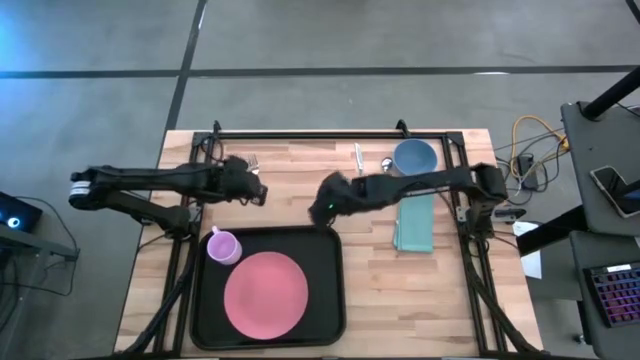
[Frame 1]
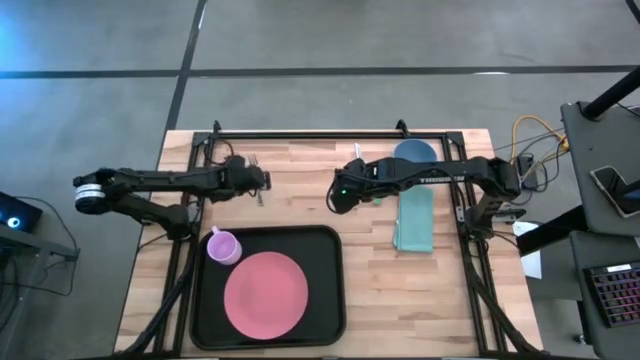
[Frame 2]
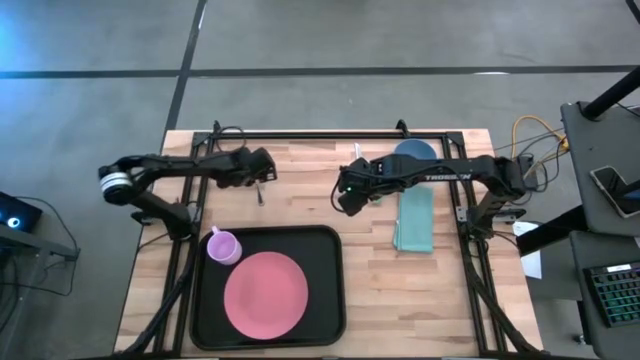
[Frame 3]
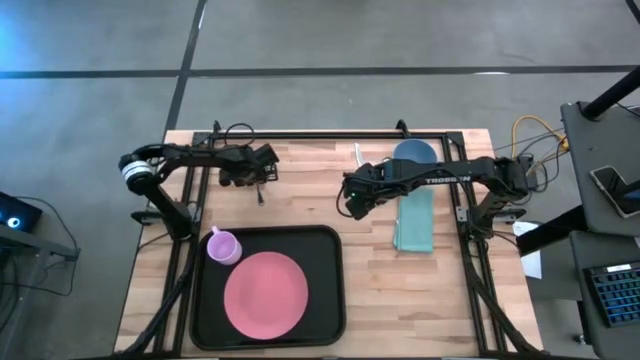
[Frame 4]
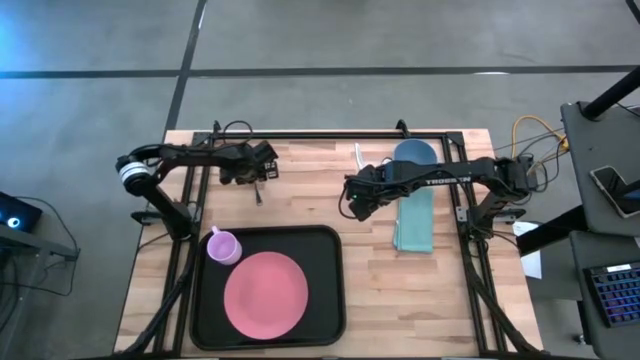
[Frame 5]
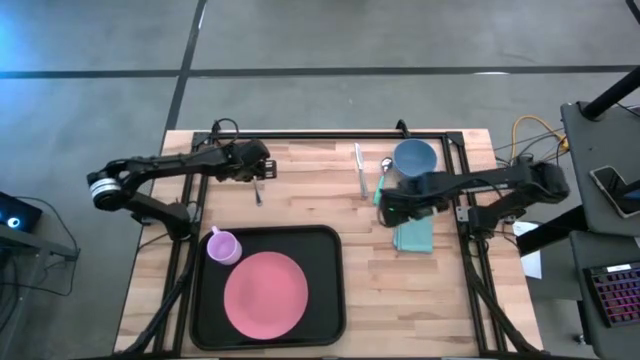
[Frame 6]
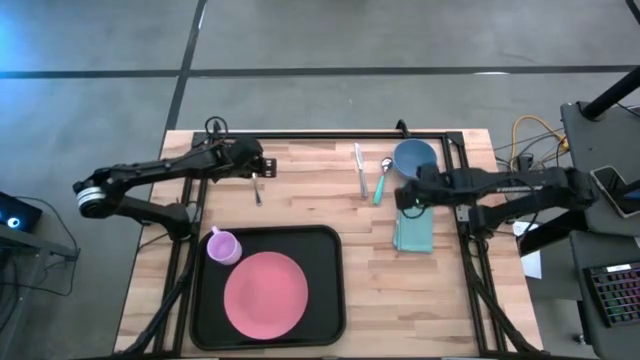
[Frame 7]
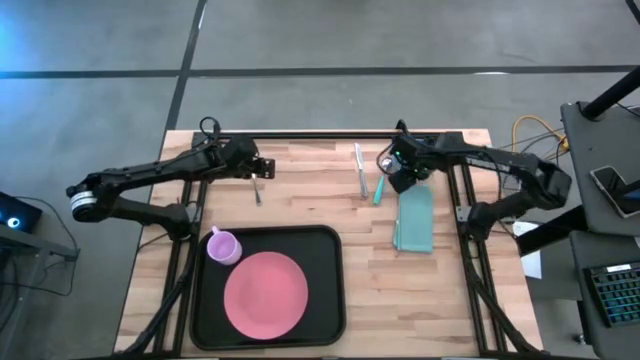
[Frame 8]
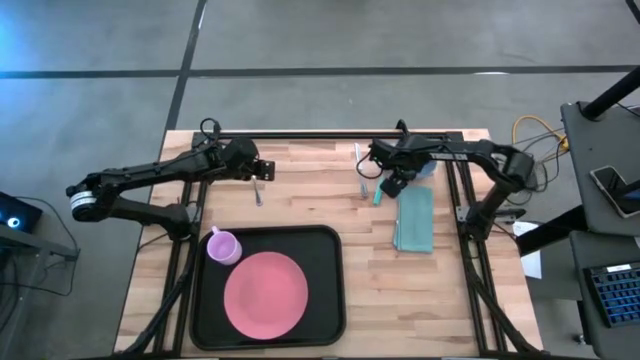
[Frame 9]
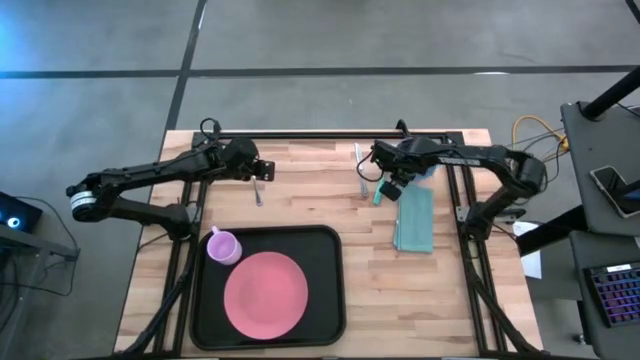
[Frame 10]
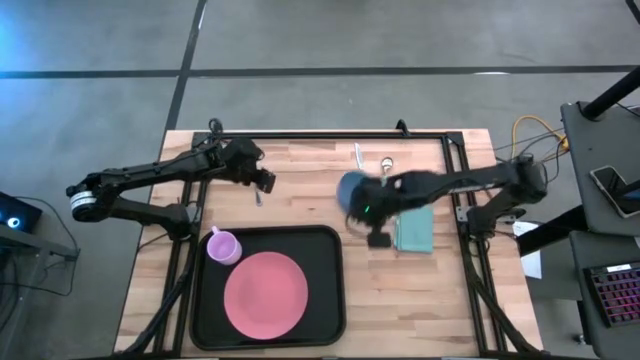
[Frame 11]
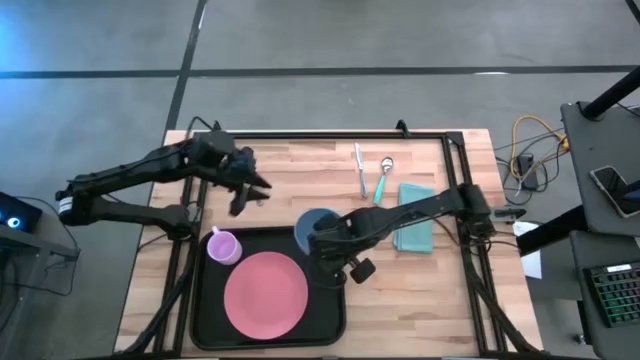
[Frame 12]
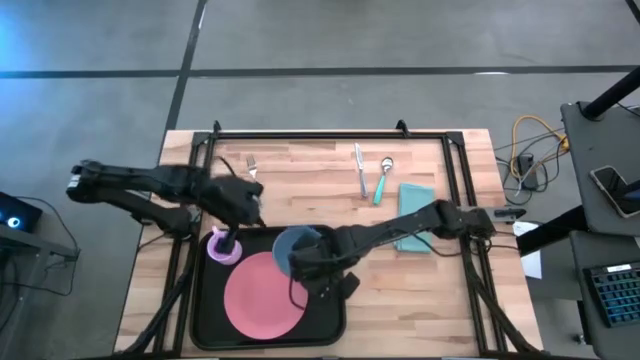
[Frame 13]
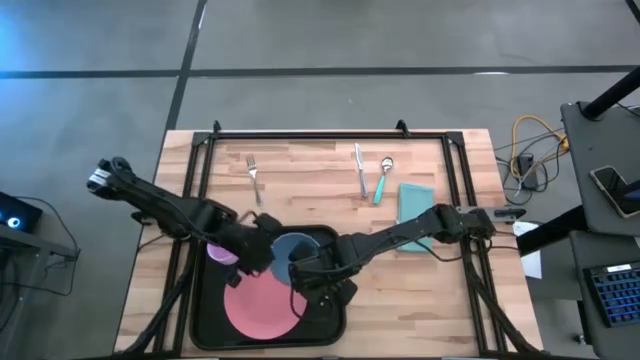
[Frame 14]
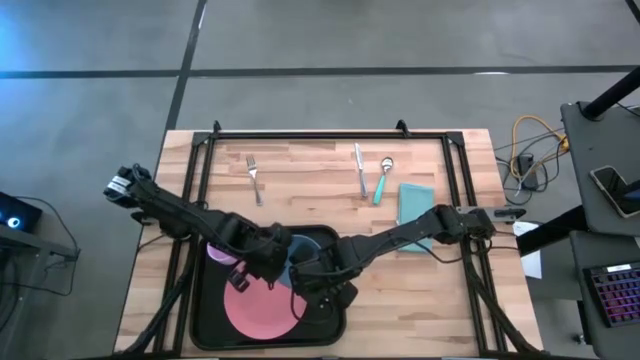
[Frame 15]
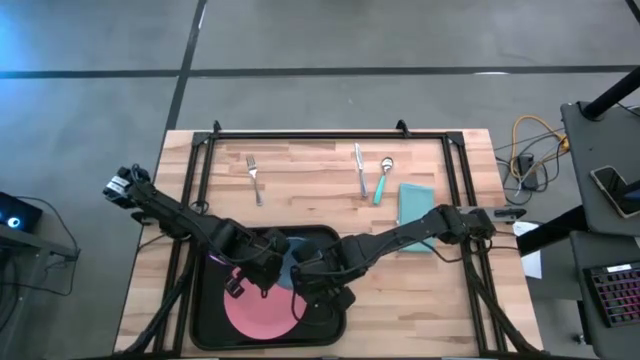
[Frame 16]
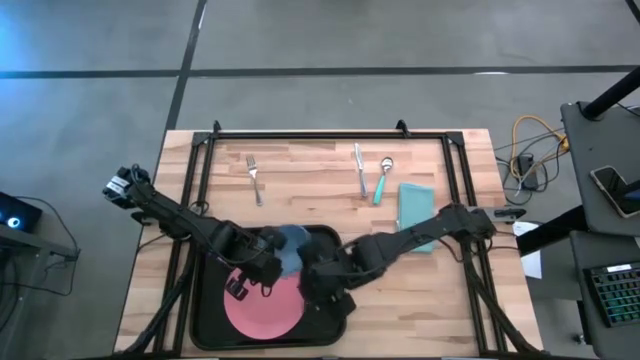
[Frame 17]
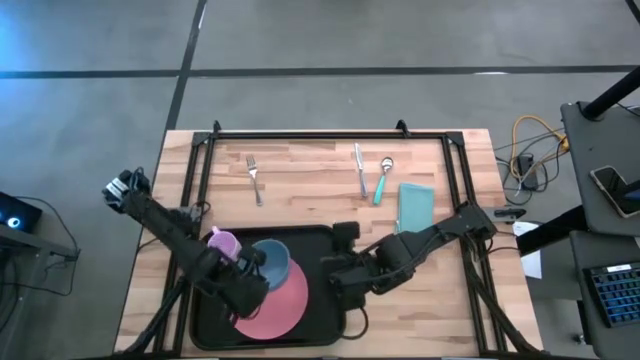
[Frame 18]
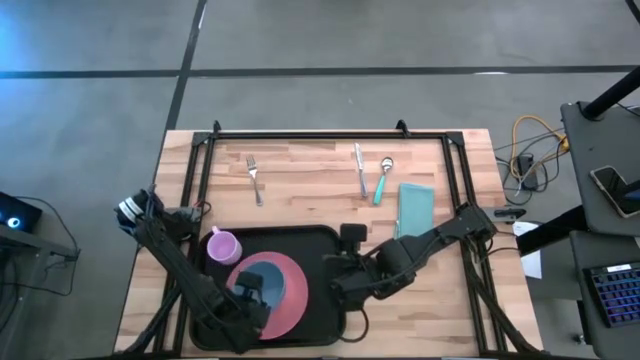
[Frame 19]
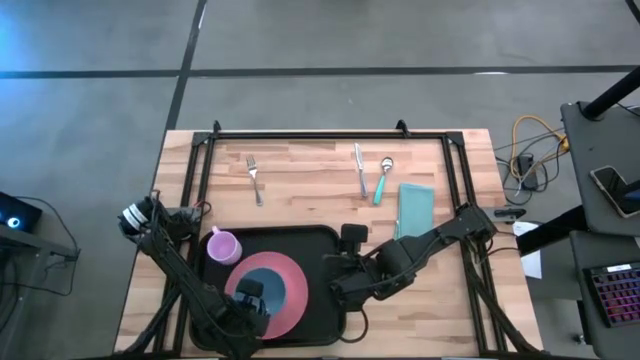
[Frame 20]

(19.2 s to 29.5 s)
Task: Set up tray
Put the blue bowl on the pink plate on the black tray

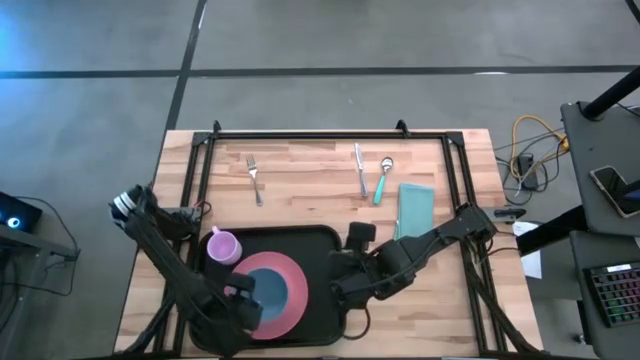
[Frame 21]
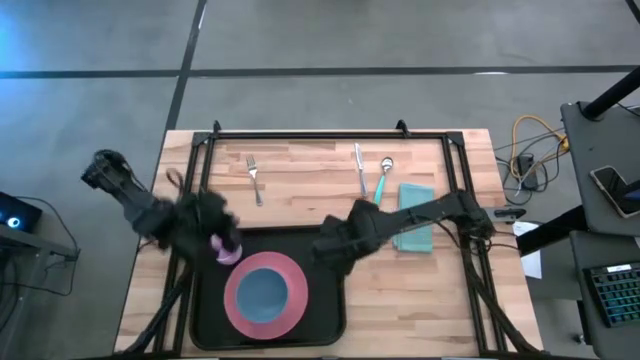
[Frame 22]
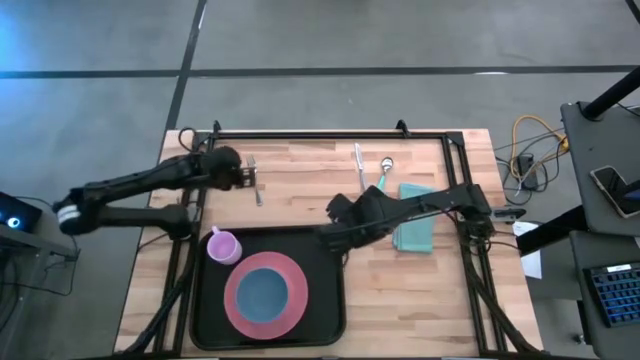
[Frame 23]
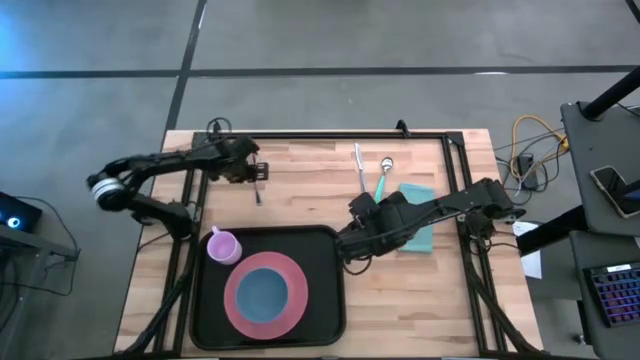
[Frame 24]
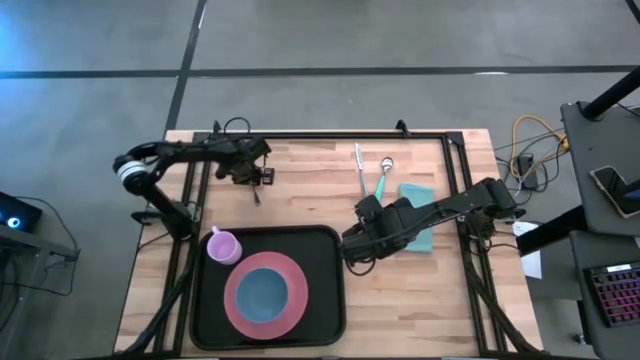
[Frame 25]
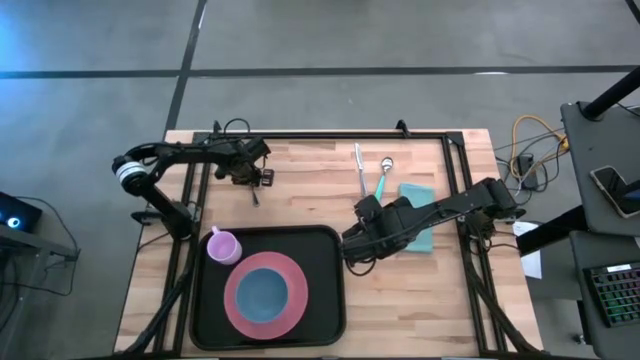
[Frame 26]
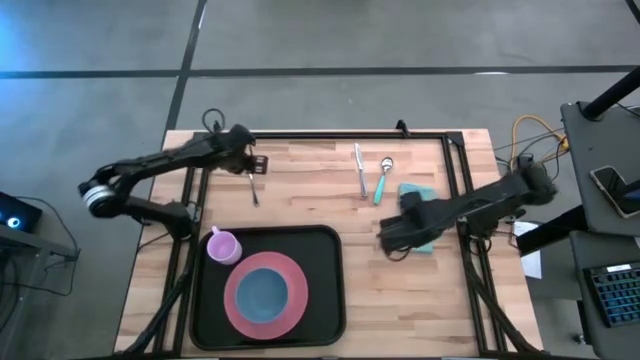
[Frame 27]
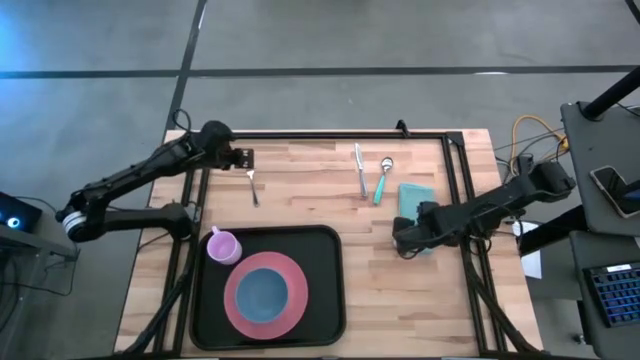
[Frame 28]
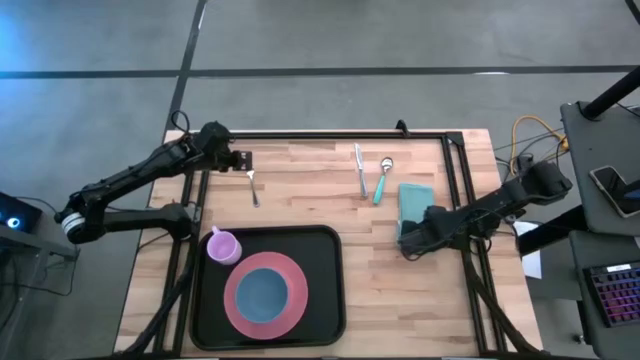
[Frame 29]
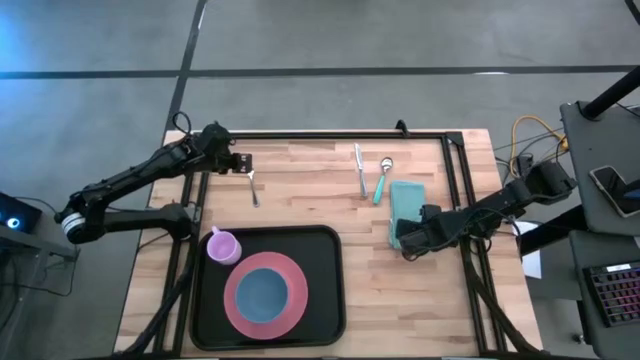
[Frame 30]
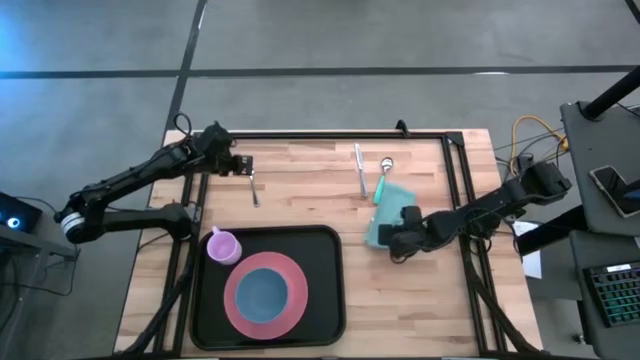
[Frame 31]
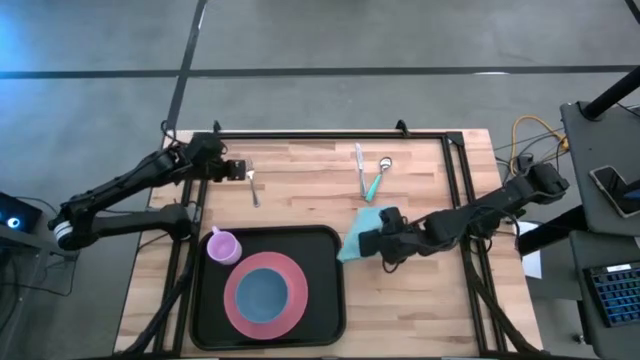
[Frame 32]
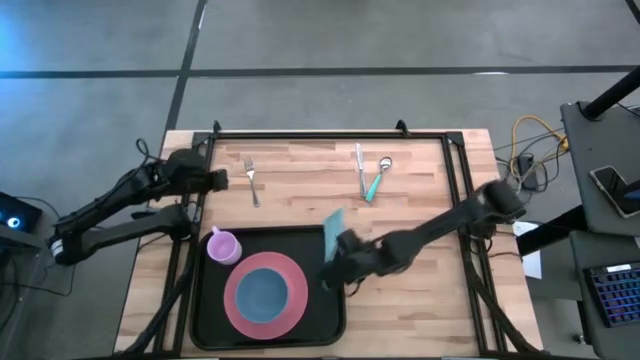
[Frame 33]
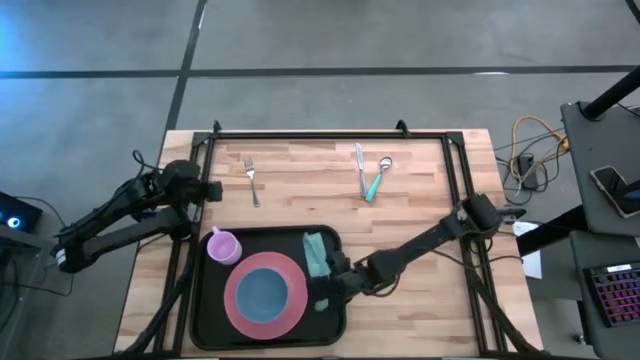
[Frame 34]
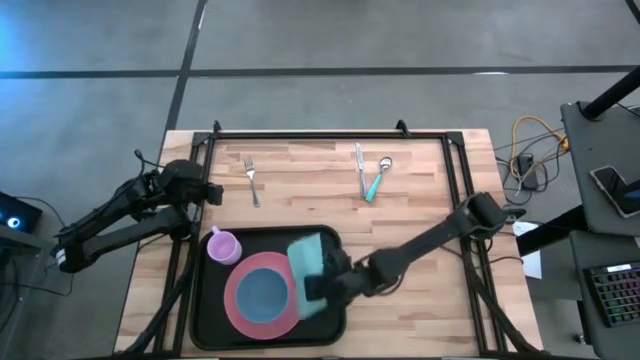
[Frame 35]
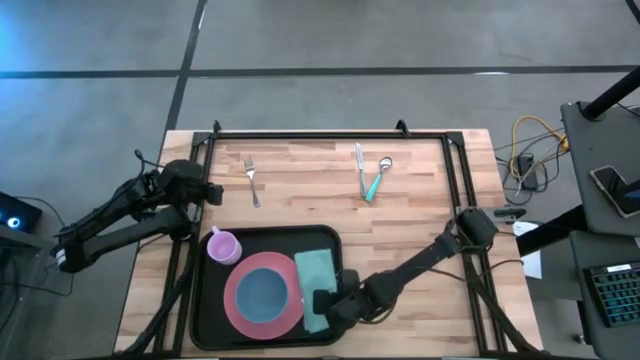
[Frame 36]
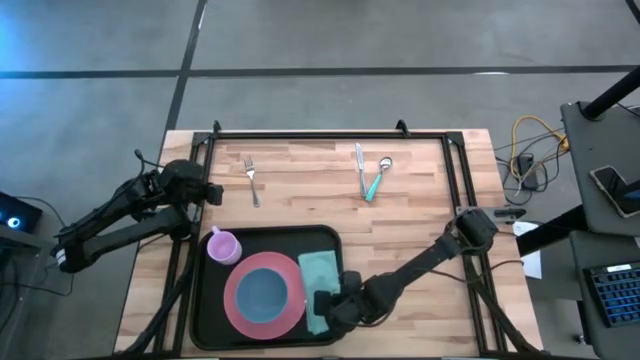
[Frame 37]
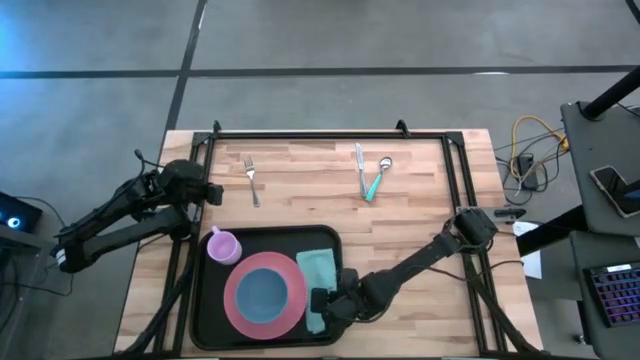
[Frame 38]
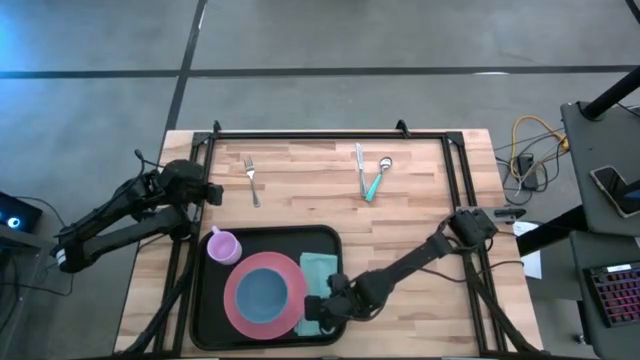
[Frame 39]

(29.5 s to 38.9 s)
Put the table napkin on the black tray beside the pink plate

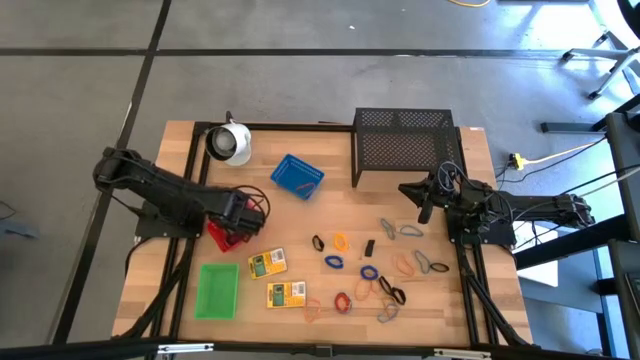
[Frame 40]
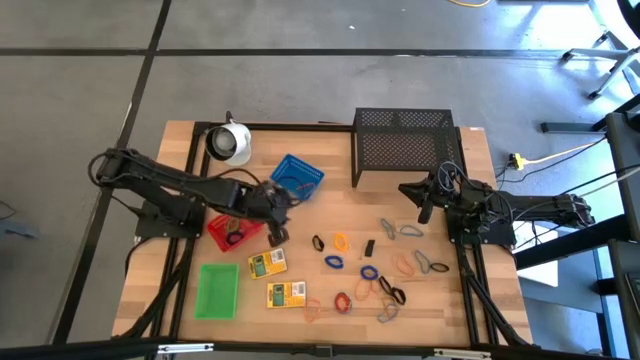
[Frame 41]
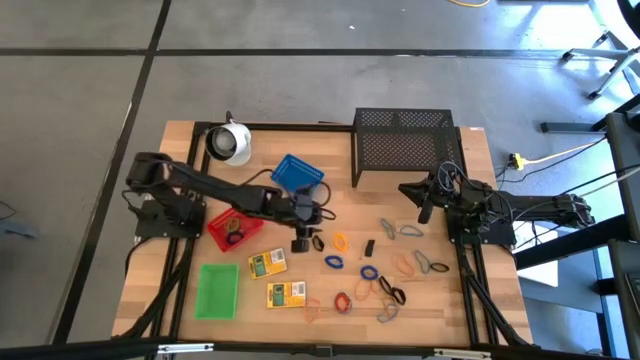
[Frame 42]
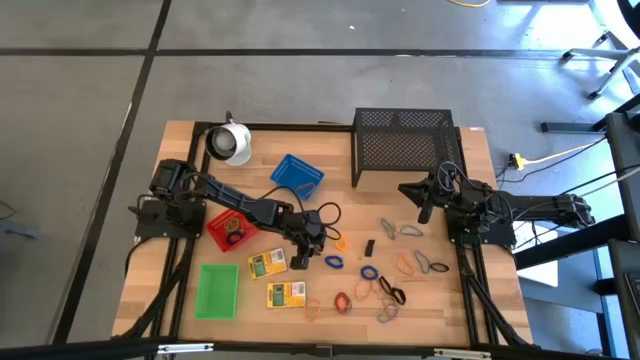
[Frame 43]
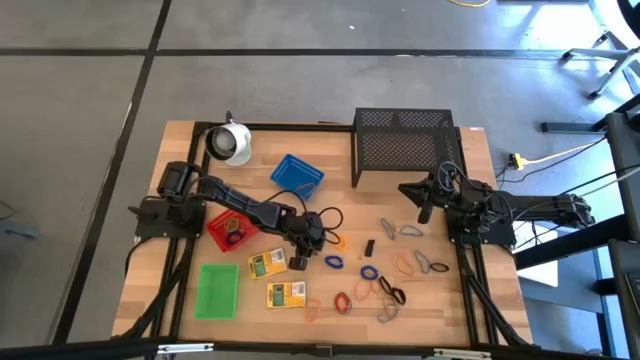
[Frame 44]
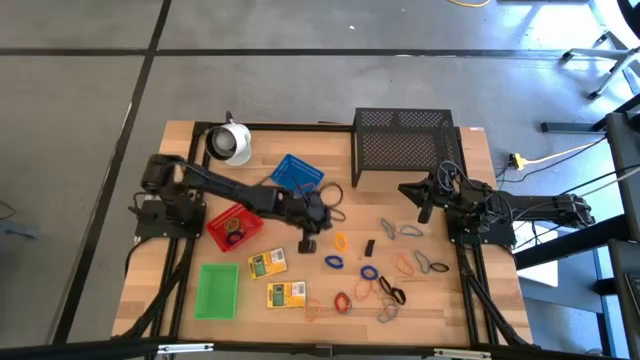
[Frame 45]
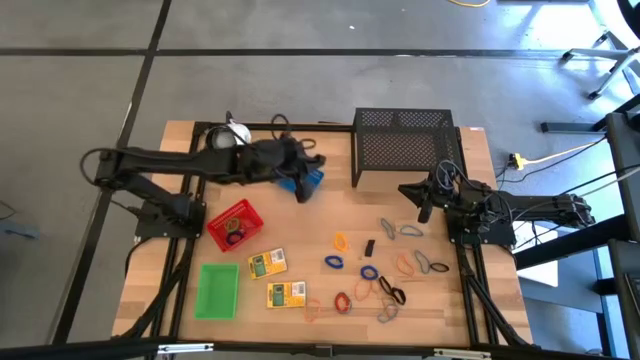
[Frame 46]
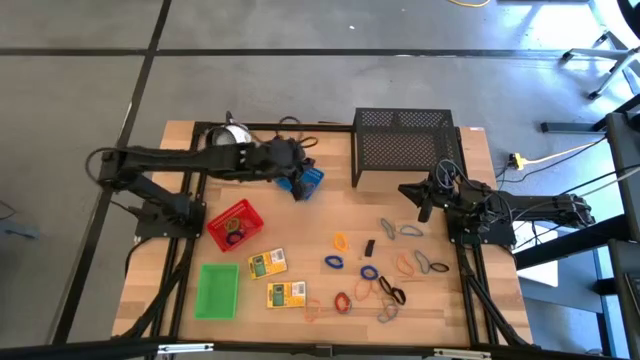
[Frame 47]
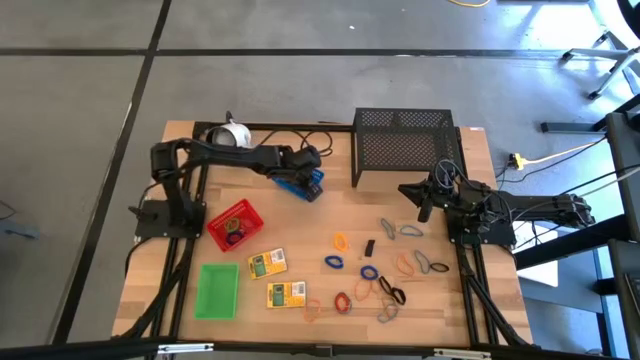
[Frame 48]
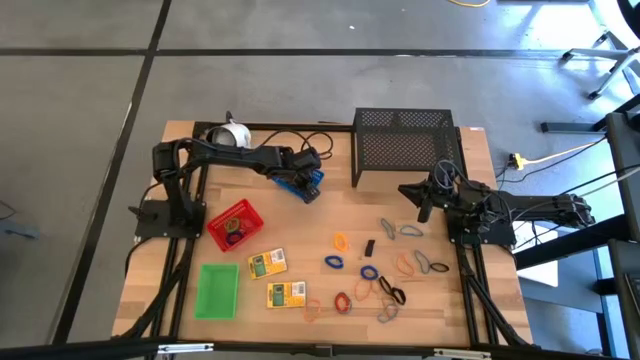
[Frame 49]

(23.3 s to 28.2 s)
Task: Pick & Place Office Desk Supplies
Put the black rubber band into the blue bin
